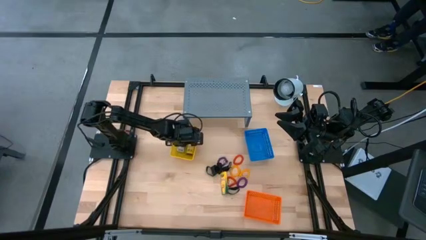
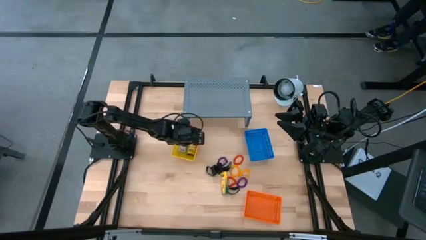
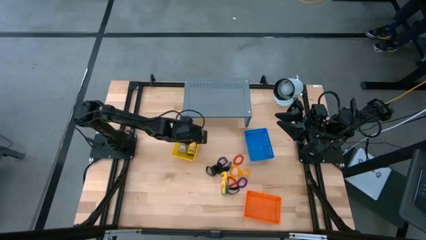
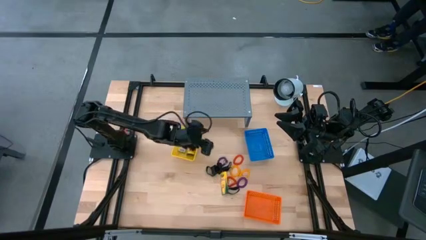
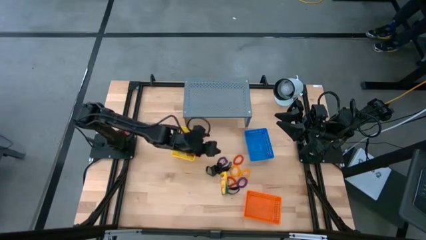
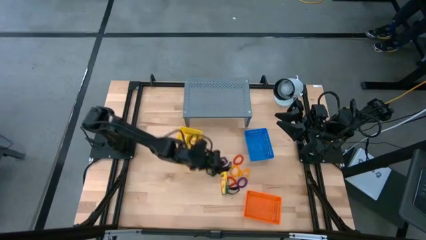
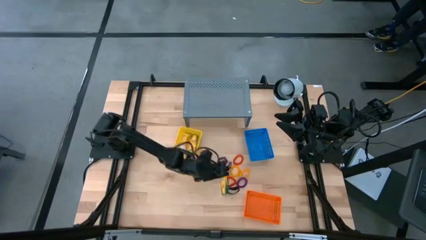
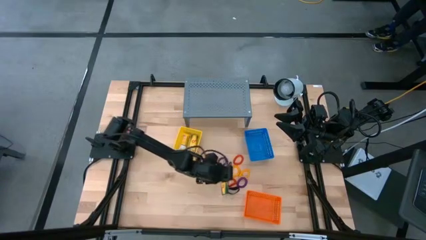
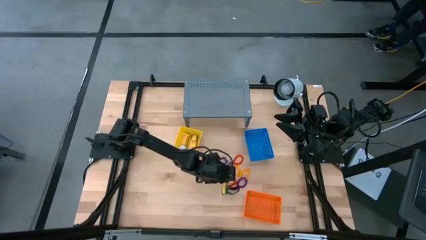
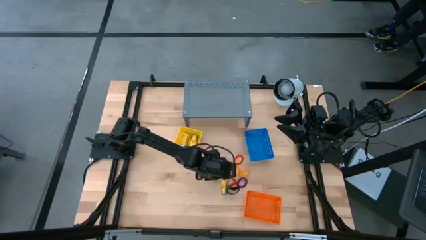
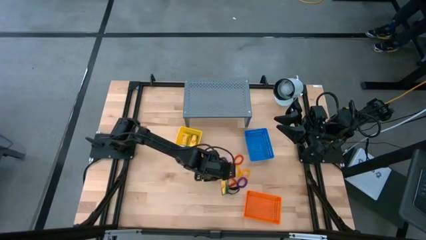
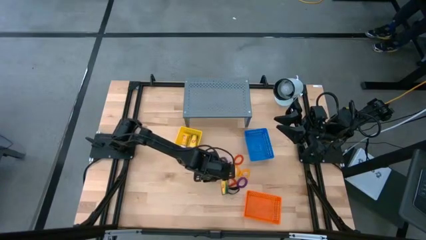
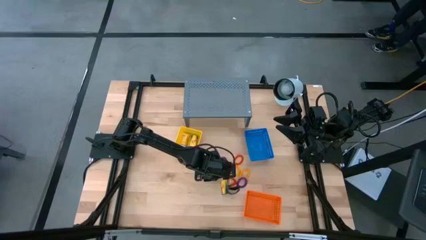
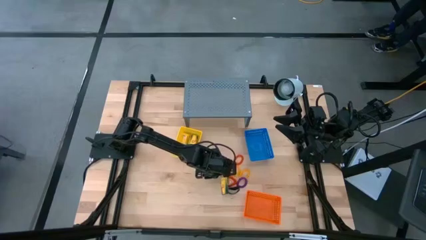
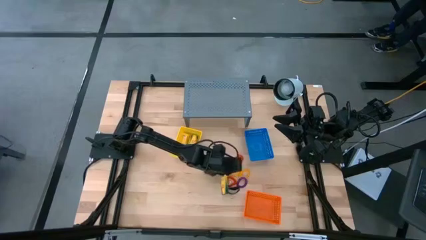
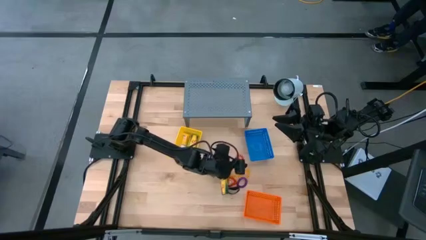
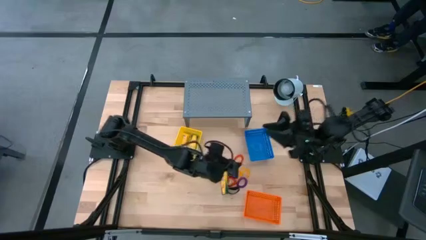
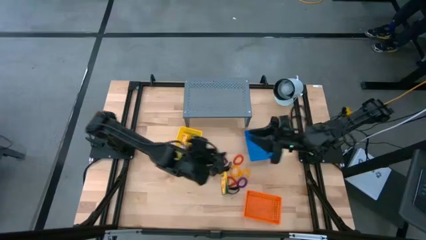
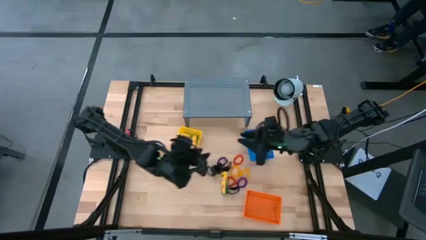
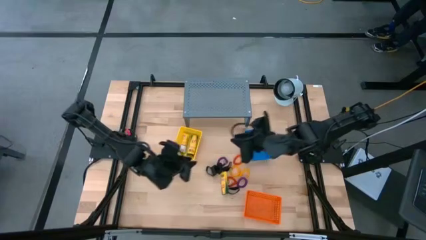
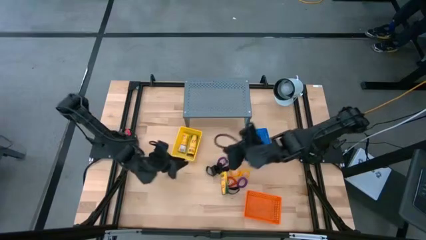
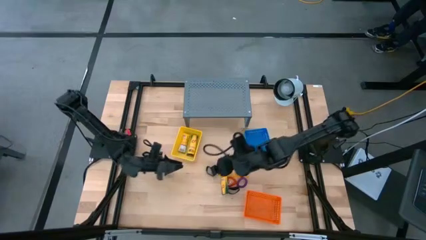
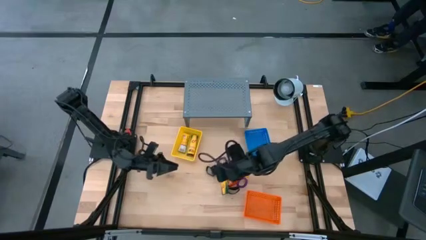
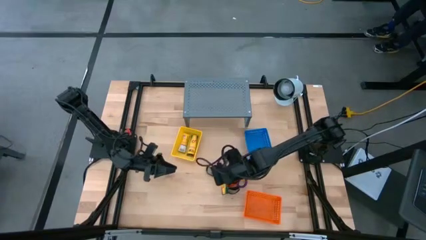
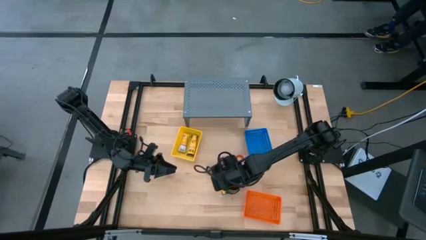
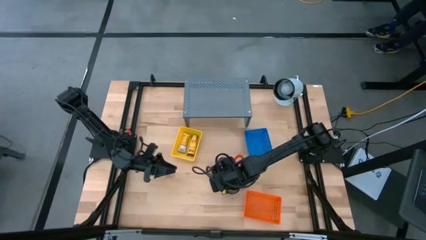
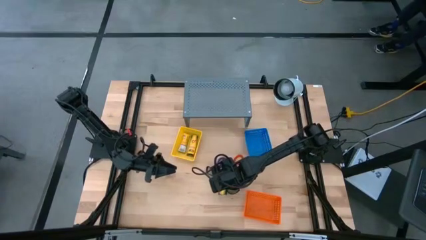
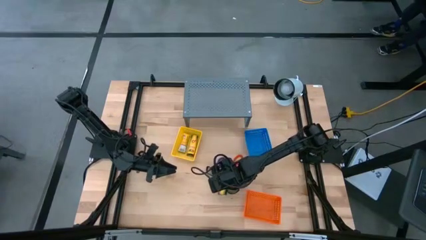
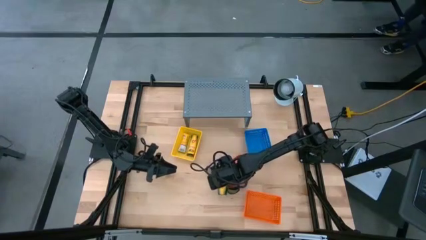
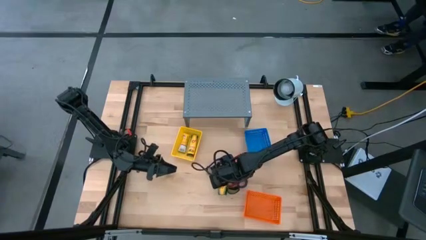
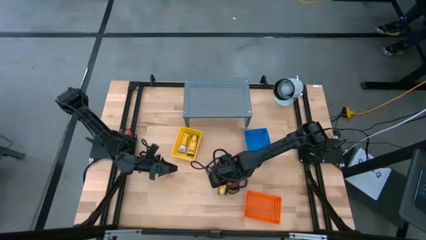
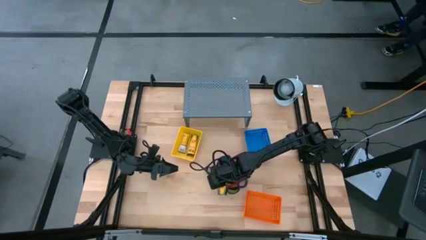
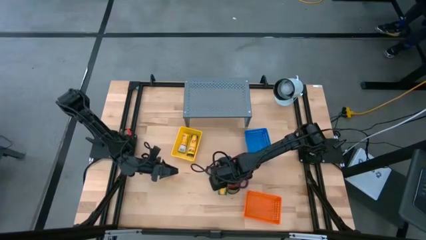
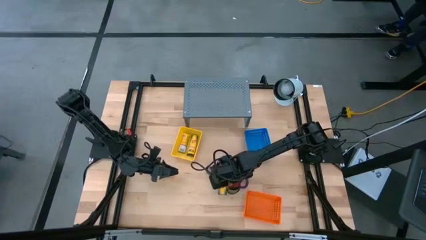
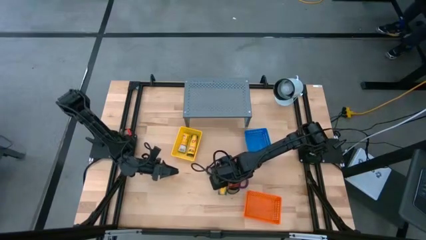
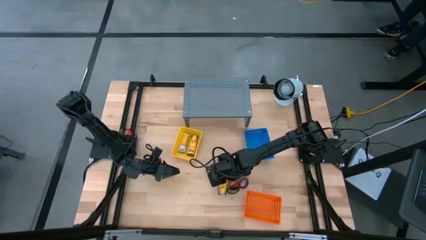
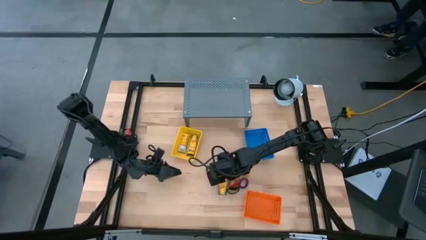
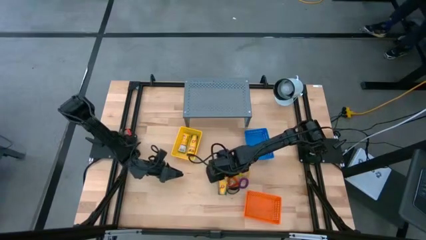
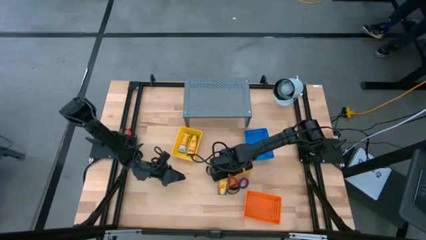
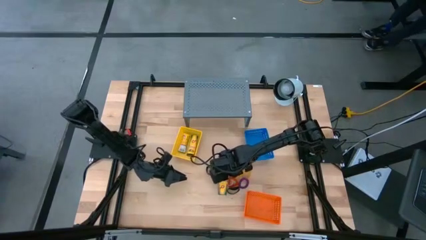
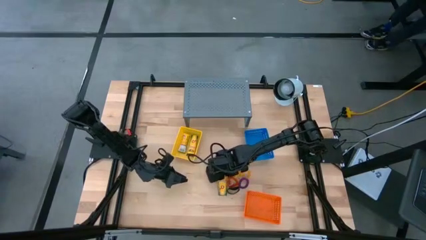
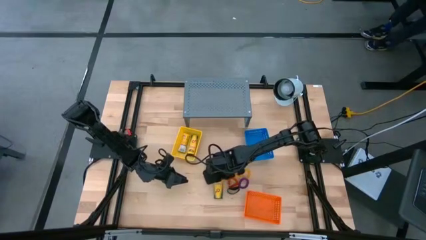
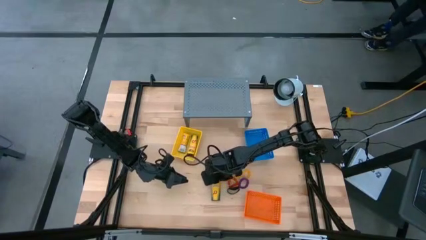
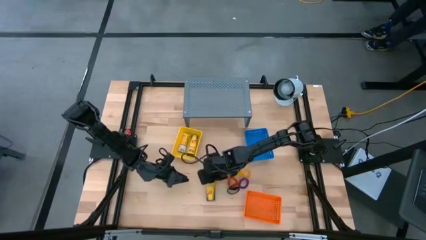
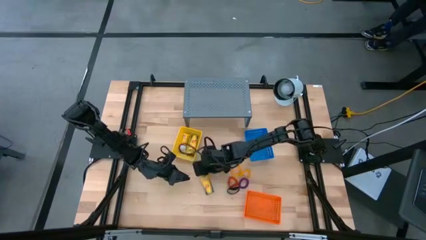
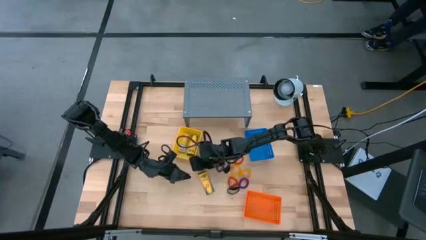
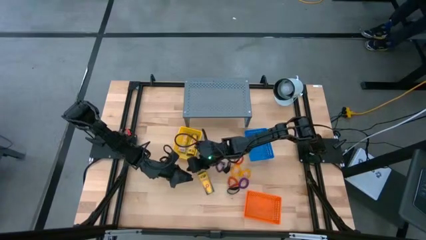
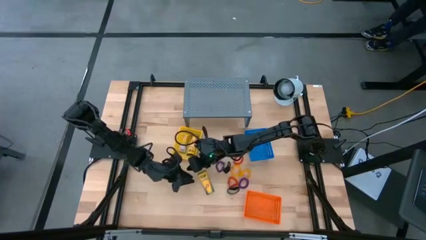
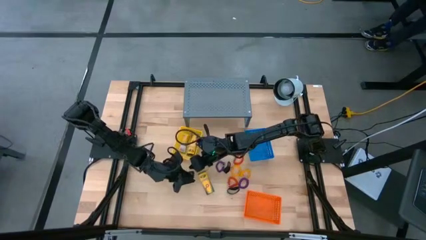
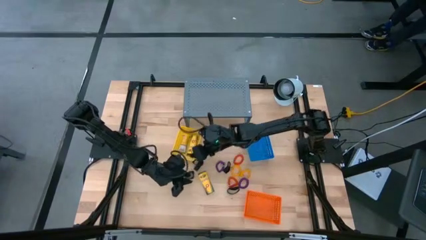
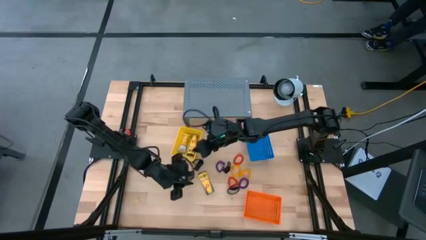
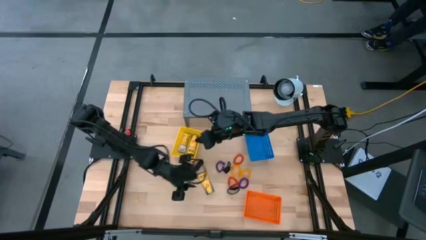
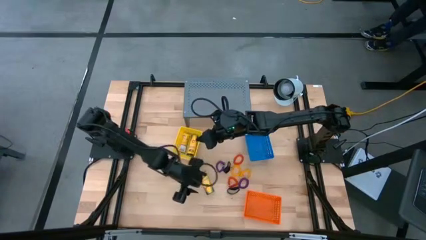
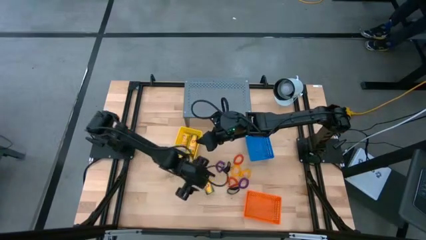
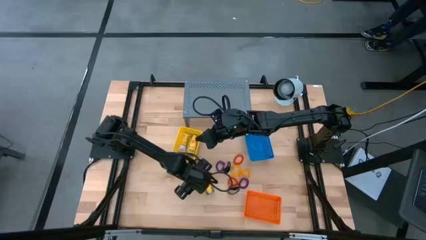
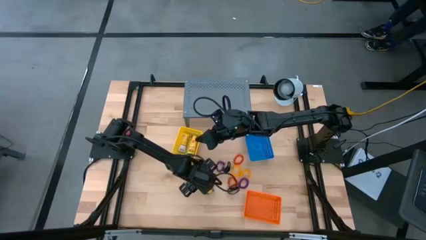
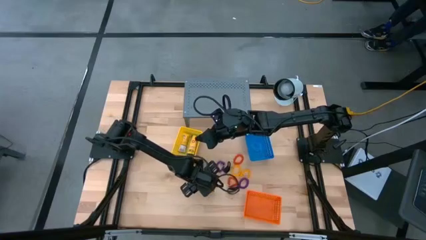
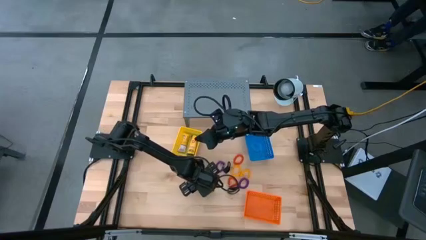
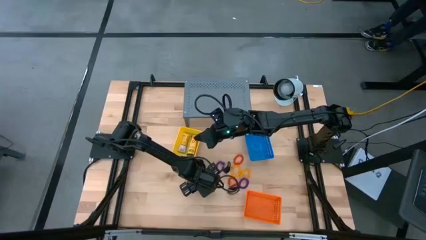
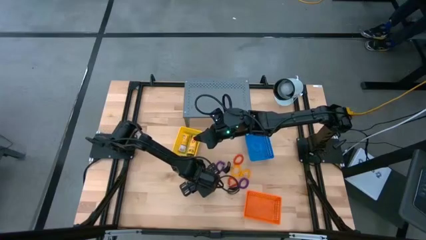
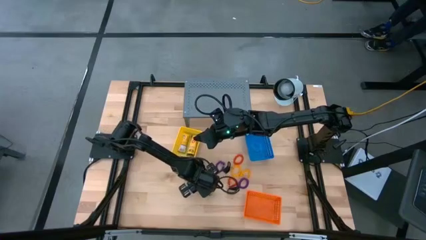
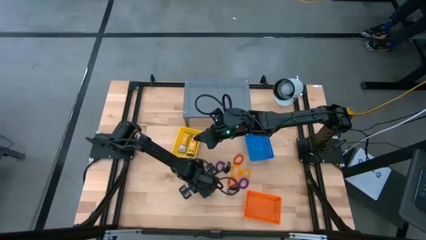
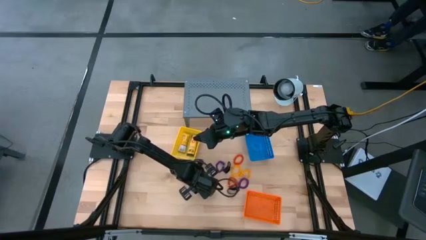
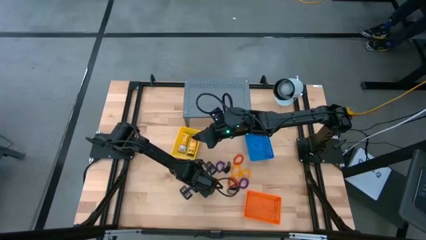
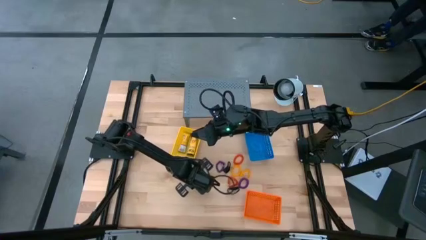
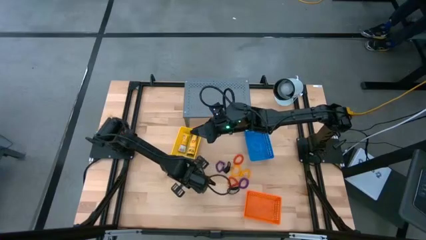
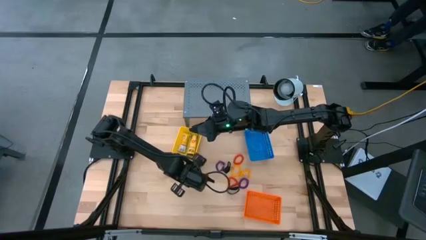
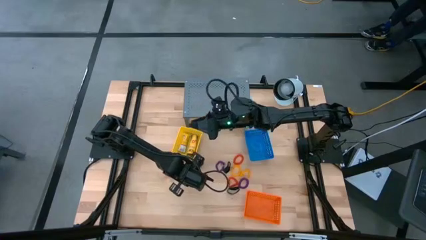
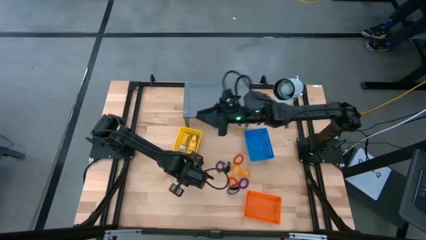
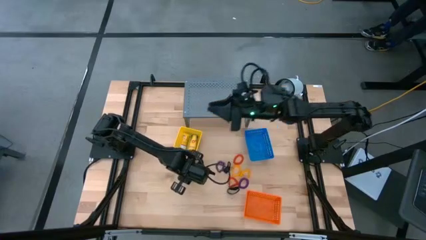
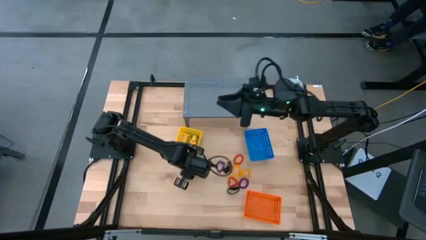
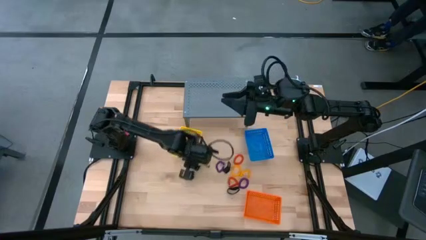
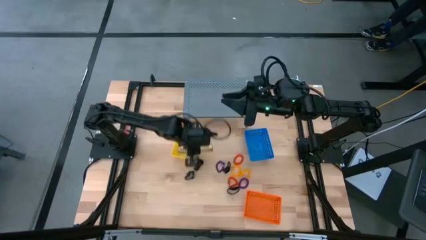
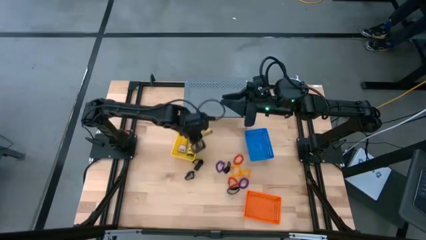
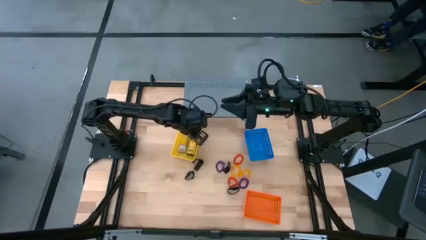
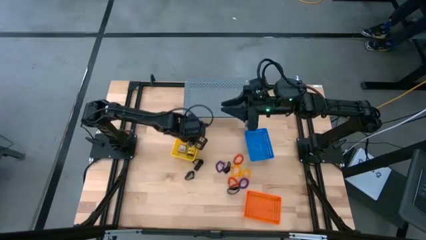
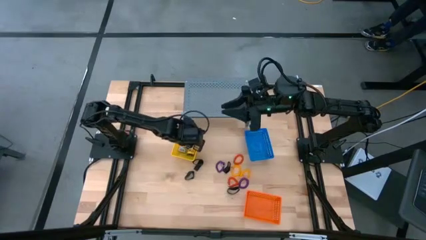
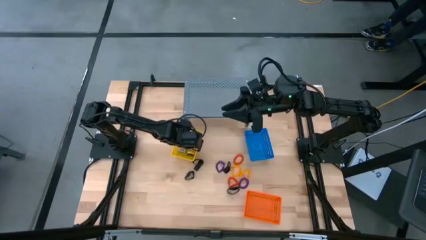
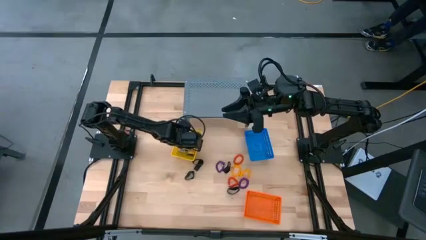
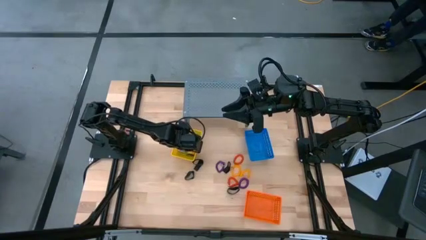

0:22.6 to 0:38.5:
Task: Pick & Place Office Desk Supplies
Put the yellow box of crayons into the yellow bin
